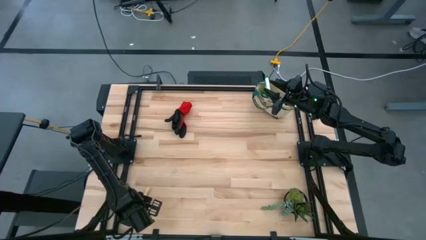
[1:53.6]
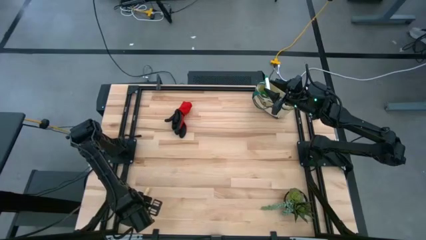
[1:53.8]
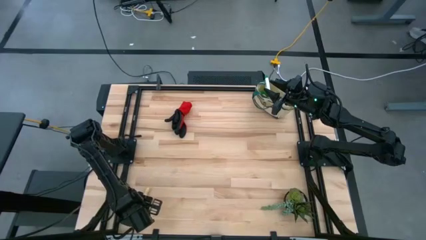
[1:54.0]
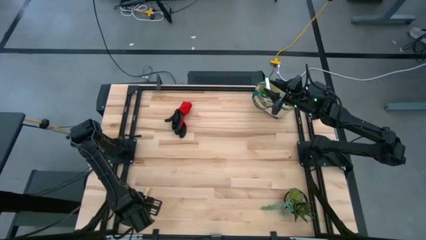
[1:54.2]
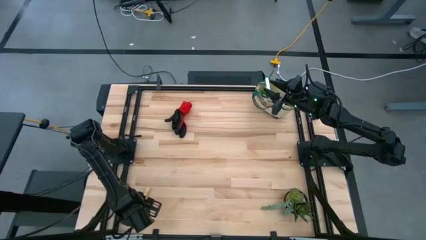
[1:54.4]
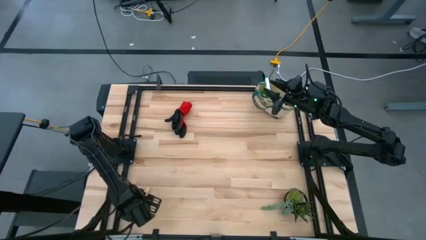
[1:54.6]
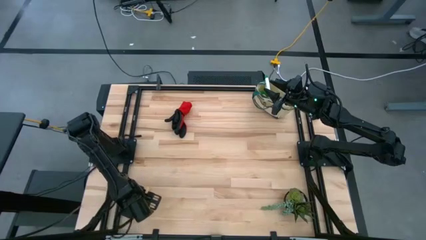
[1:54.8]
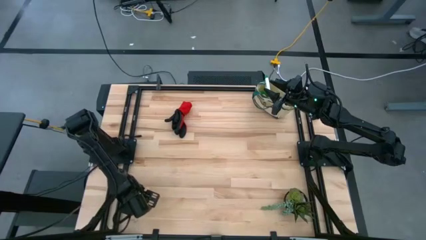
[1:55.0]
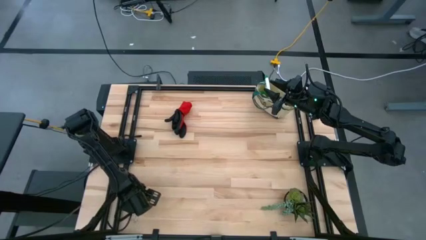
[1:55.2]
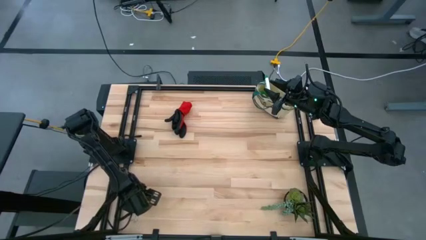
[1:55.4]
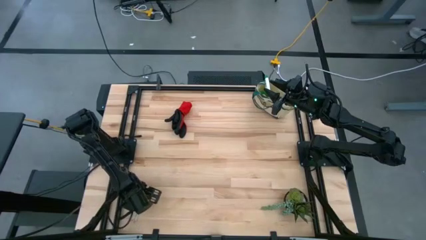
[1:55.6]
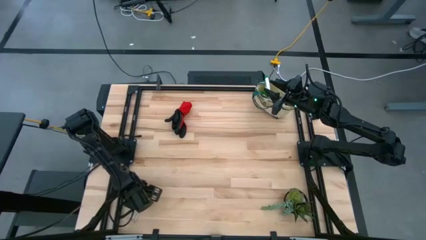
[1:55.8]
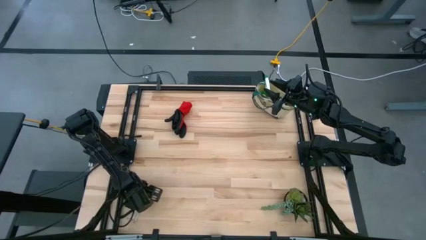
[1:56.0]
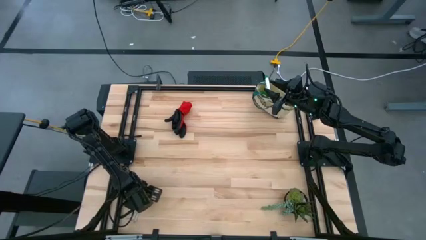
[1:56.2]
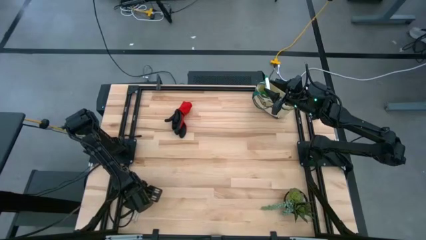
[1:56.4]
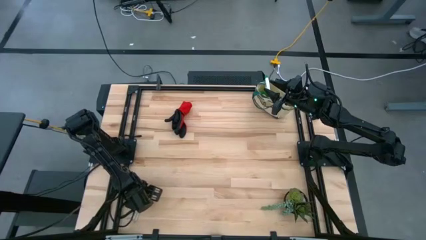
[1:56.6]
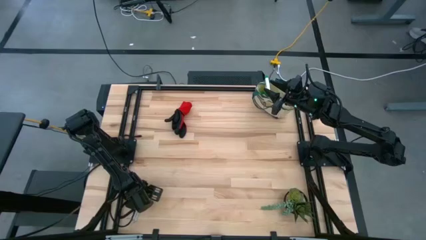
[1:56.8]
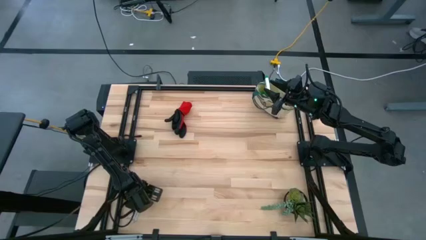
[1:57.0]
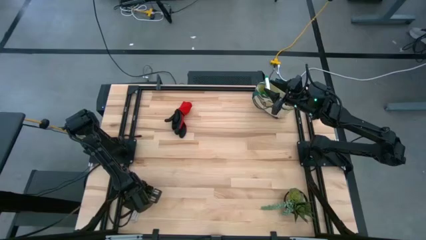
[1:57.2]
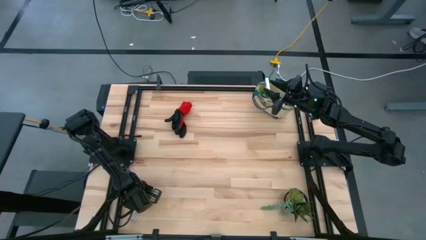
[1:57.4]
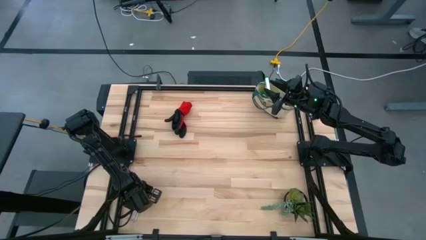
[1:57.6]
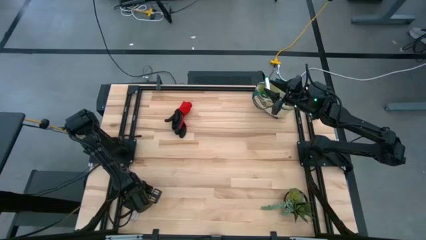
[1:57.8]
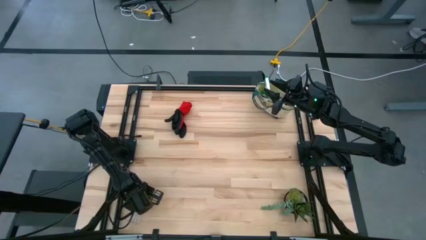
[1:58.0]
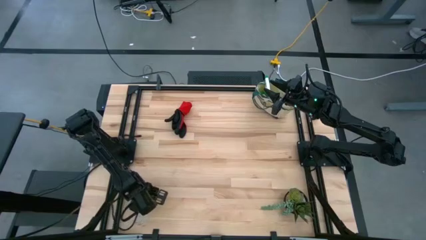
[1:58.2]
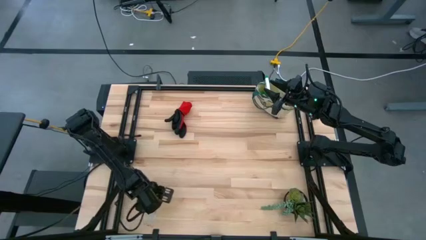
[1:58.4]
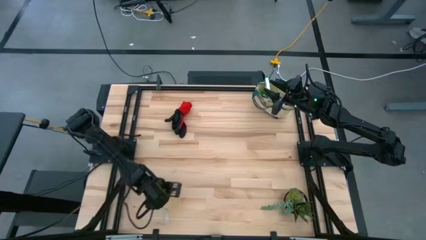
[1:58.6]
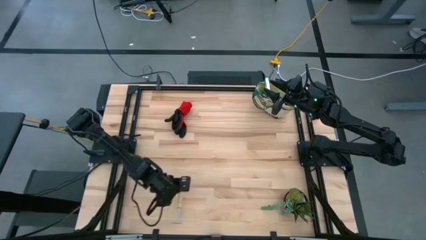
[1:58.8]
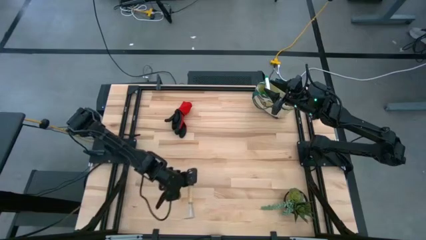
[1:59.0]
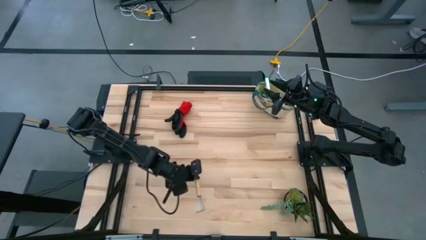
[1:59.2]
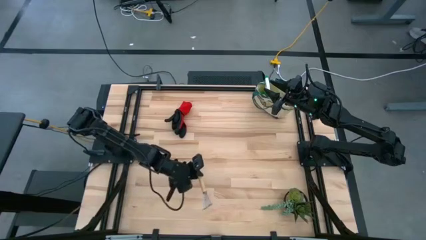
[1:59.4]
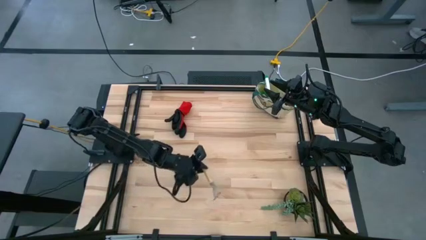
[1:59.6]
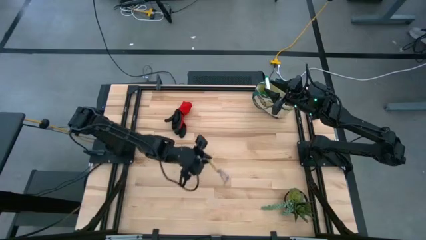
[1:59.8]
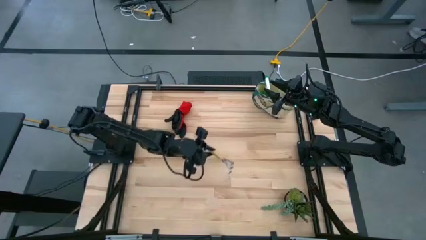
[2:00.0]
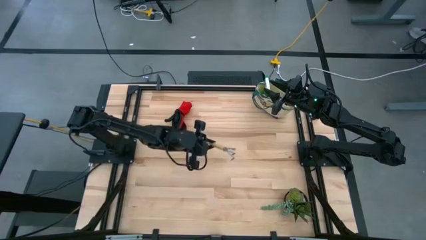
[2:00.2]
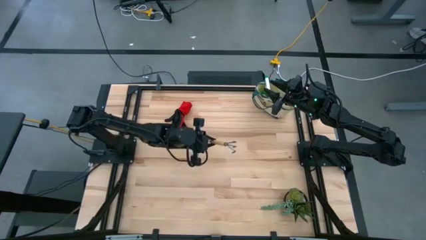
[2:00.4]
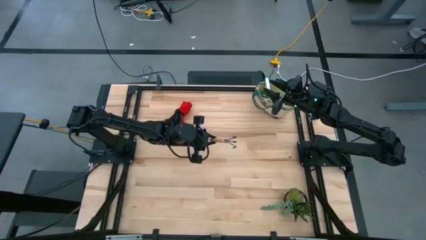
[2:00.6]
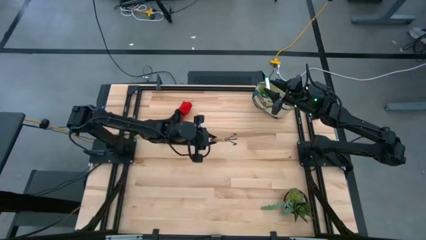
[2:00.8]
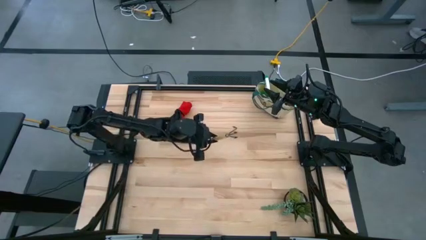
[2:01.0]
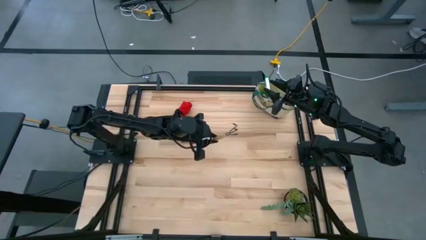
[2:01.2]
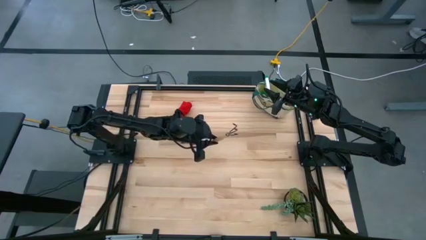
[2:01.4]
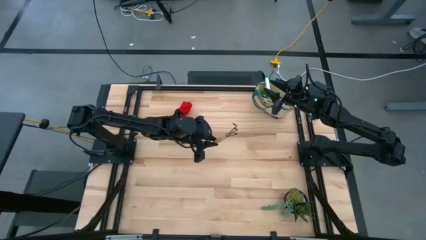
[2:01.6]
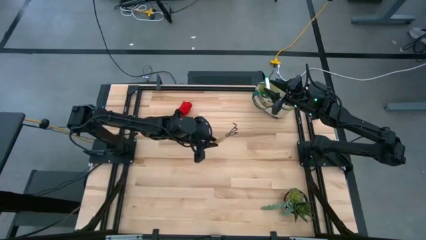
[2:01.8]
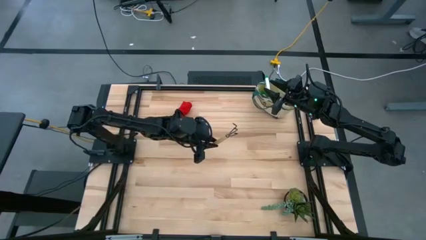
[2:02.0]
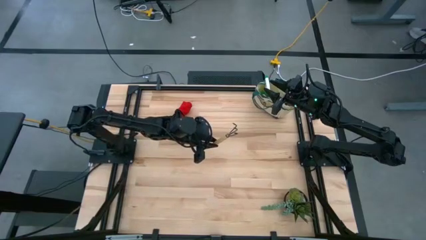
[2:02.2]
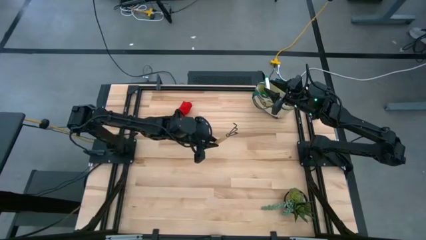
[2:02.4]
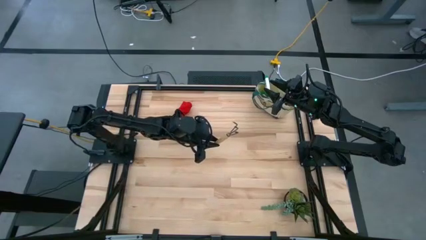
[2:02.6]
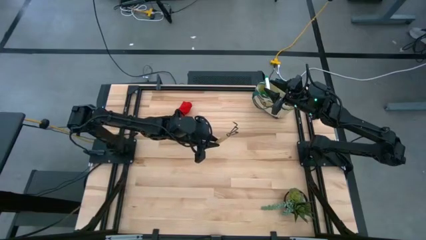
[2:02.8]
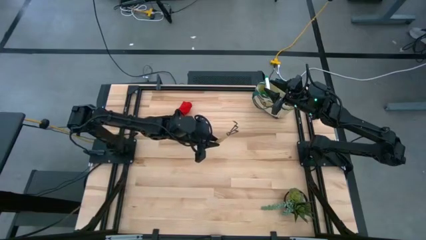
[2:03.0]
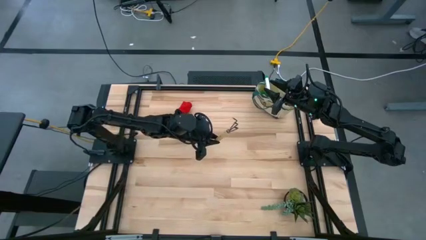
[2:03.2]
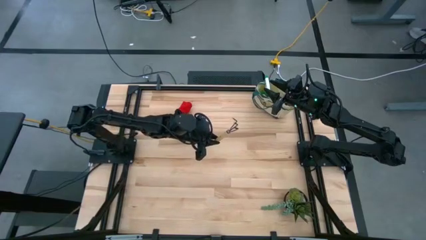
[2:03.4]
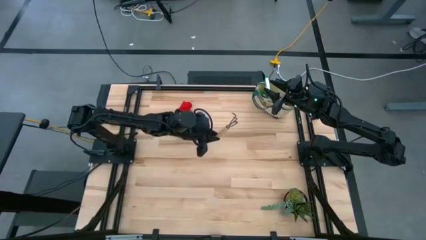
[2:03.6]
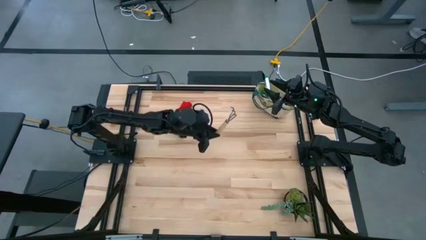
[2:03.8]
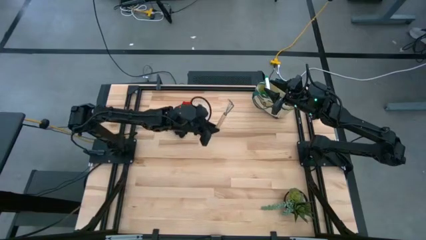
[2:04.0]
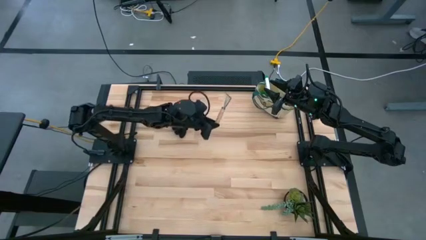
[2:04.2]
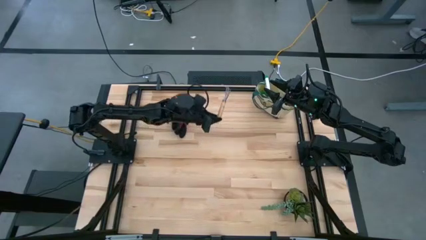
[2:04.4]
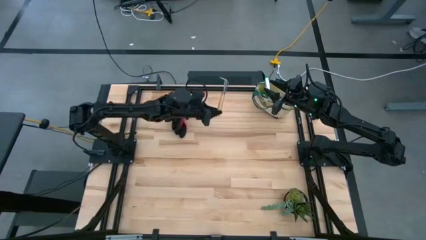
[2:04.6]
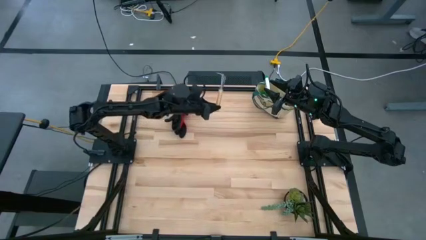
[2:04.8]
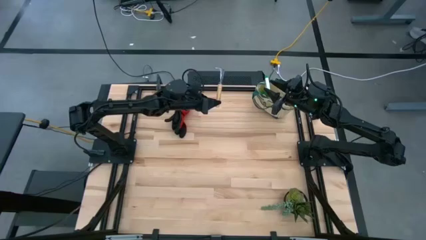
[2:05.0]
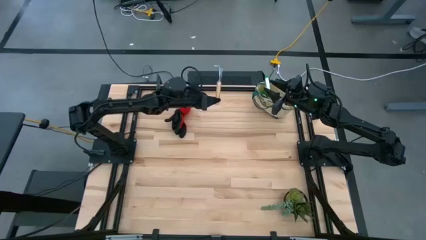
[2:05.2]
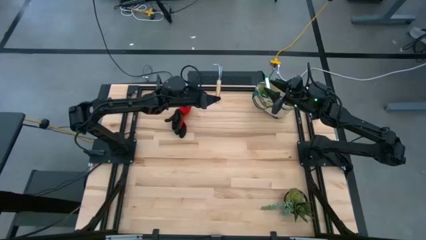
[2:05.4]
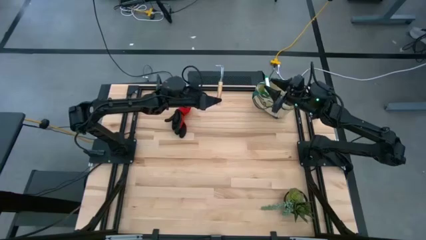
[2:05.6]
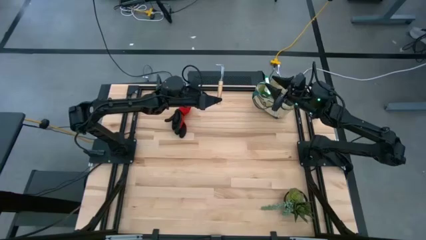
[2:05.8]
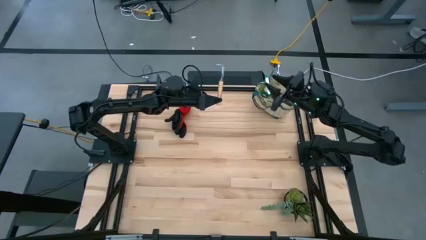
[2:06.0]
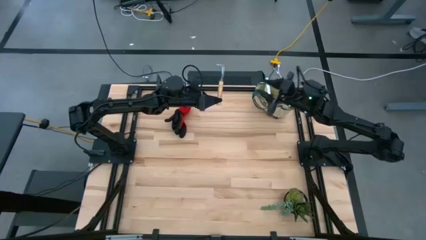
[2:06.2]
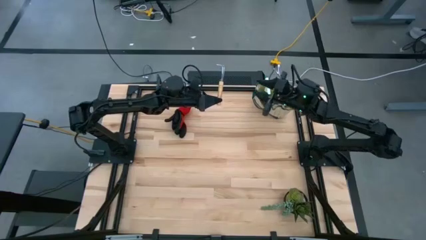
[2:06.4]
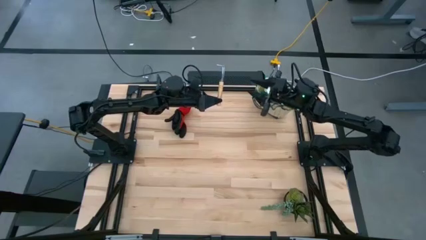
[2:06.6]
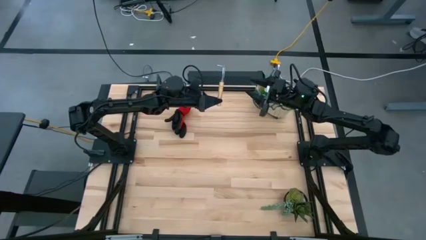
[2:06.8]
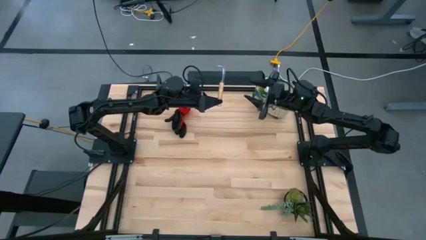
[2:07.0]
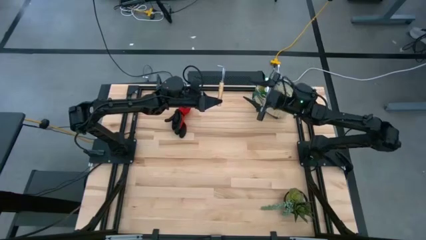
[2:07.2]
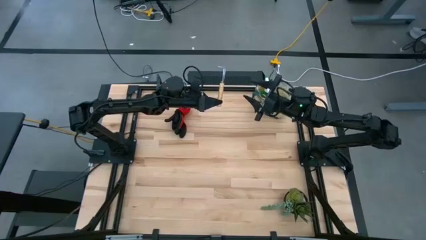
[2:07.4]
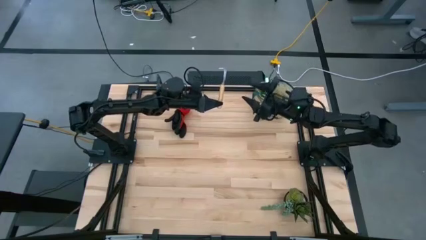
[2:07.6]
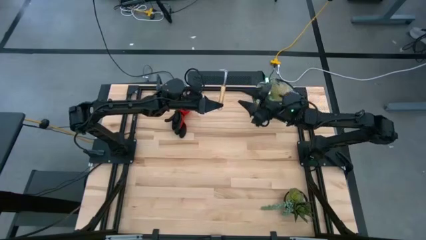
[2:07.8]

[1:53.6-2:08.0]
Task: Pick & Place Garden tools in Gardening bag
Put the brown hand rake into the gardening bag

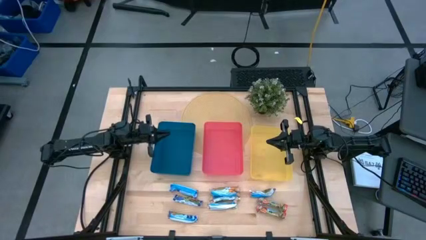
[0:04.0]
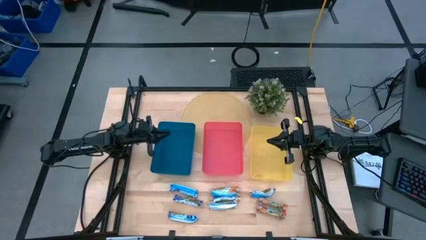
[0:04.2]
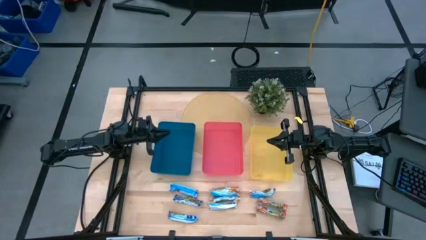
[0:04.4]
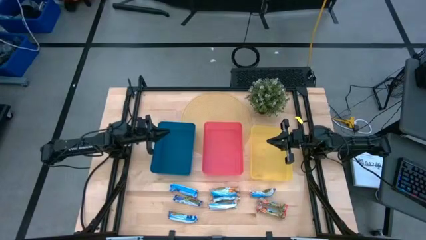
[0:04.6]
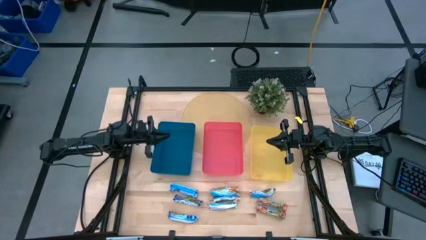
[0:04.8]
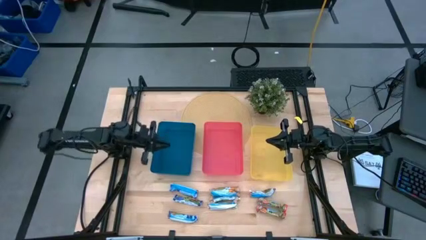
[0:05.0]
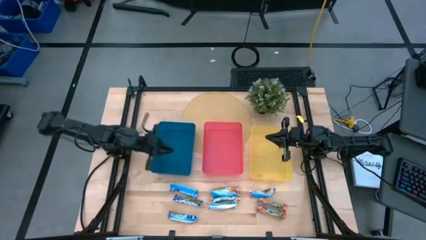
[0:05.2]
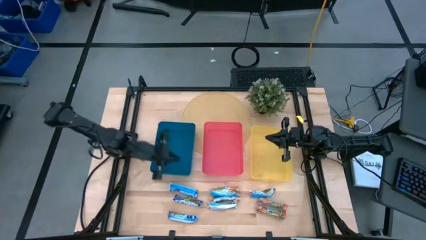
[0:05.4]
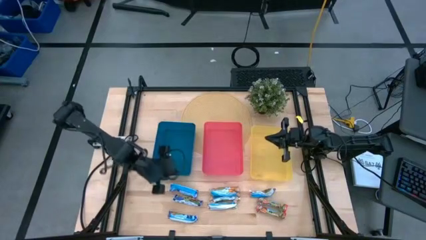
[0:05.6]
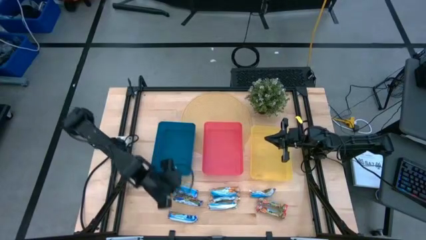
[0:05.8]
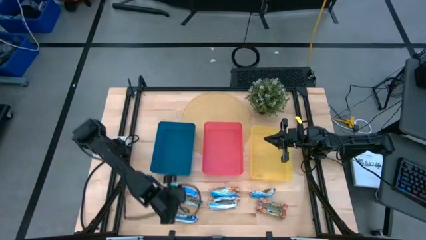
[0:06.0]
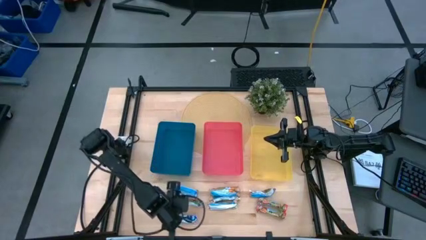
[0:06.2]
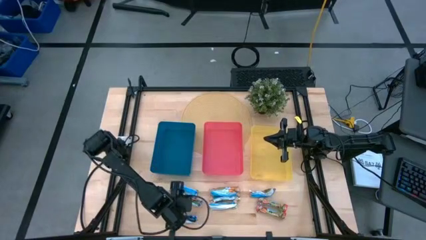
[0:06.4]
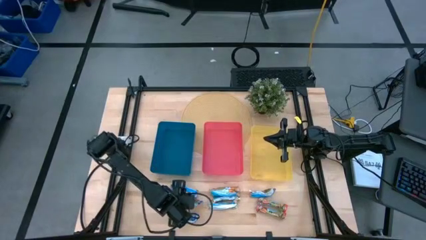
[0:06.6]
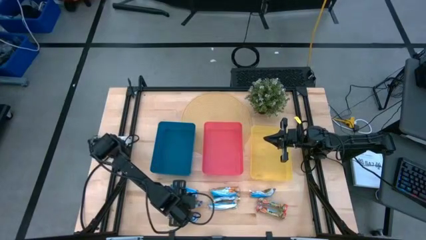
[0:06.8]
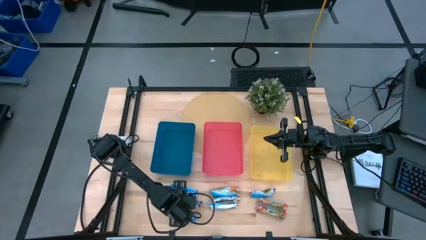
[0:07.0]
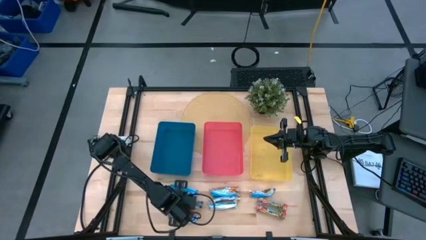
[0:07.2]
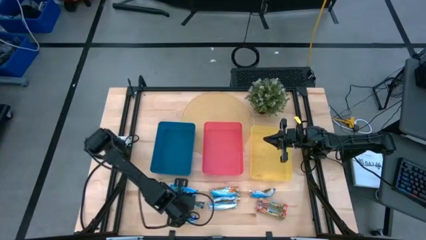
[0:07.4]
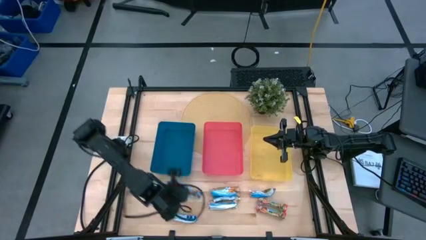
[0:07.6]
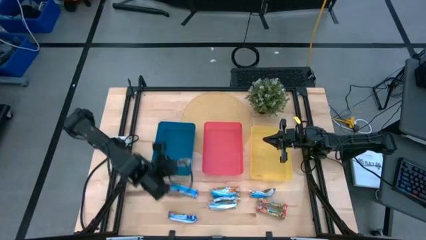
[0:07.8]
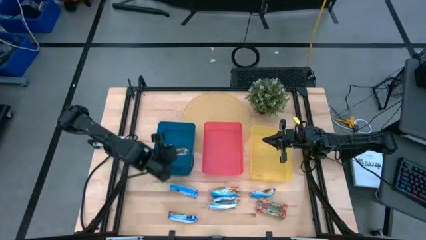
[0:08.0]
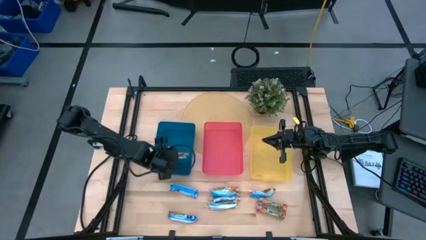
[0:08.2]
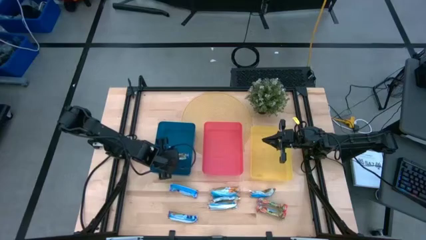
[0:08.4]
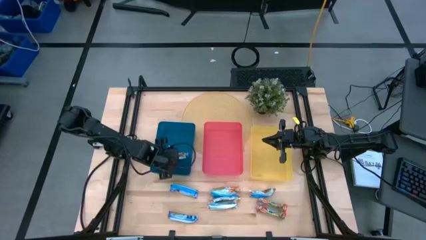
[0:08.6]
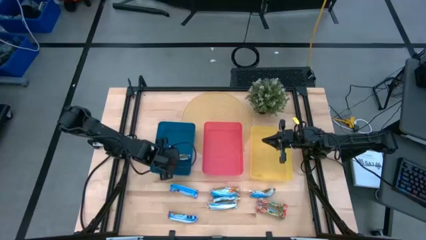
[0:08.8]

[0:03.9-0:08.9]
Task: Pick and place Granola Bars by type
Put the blue granola bar into the blue bin
